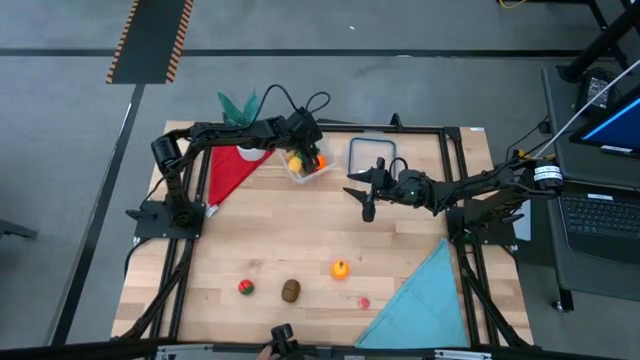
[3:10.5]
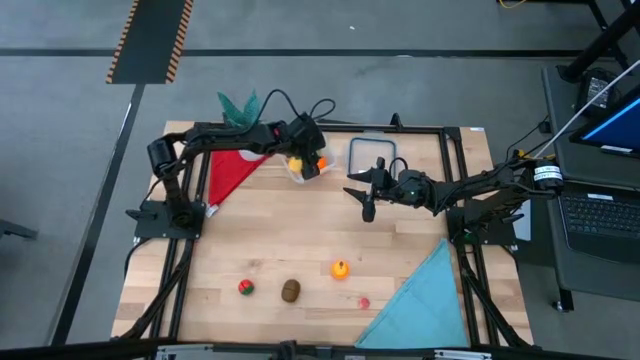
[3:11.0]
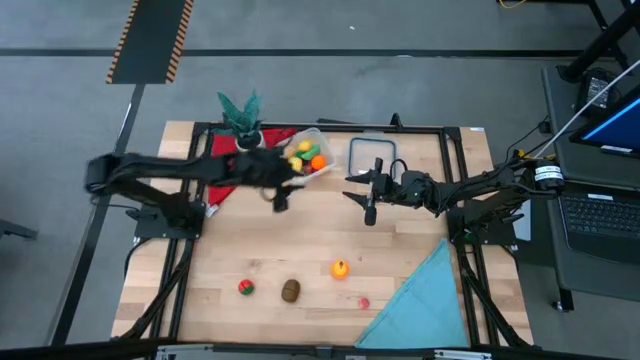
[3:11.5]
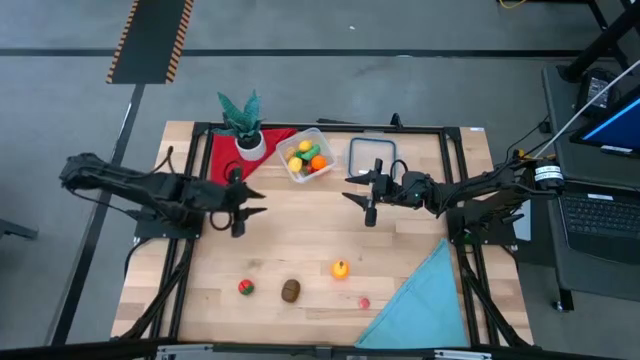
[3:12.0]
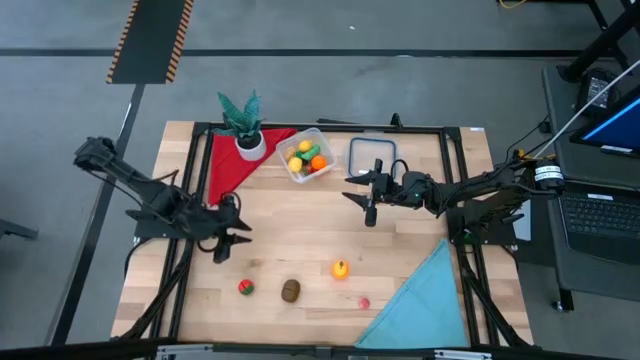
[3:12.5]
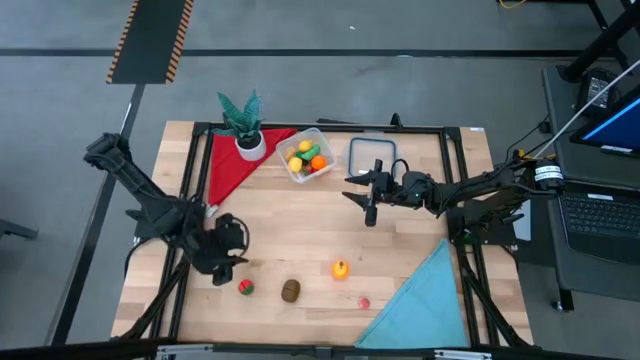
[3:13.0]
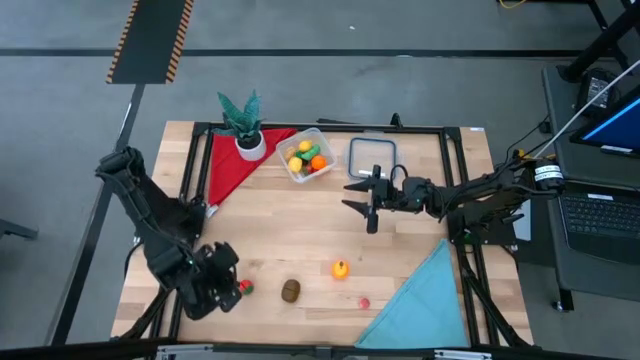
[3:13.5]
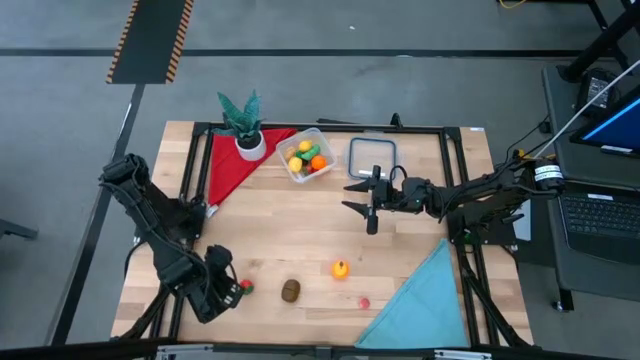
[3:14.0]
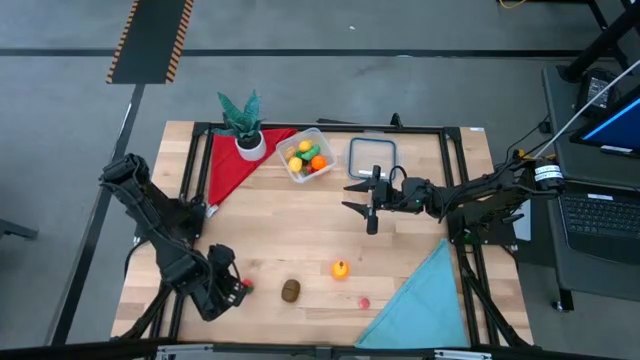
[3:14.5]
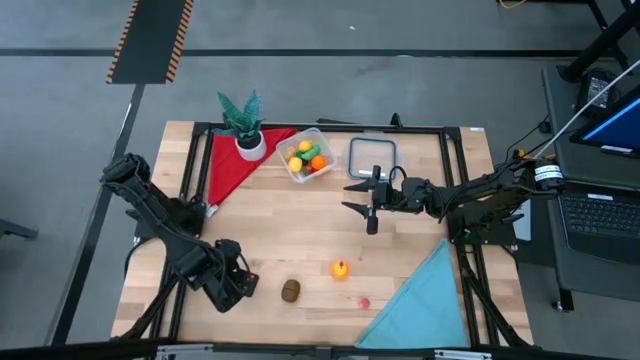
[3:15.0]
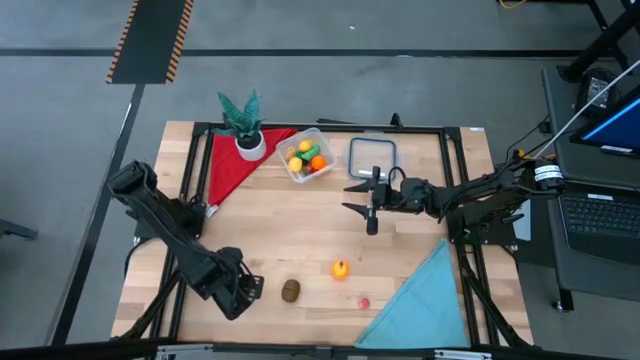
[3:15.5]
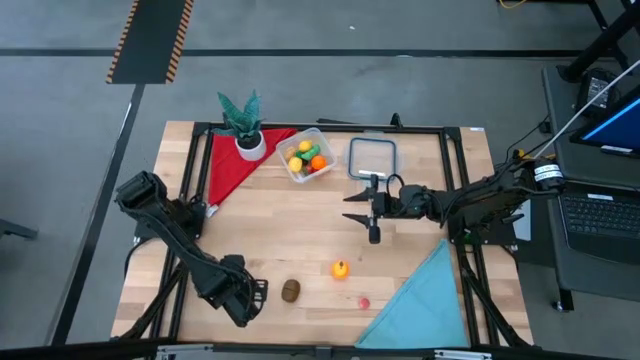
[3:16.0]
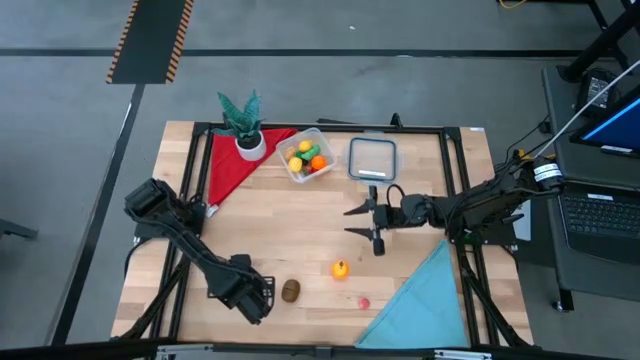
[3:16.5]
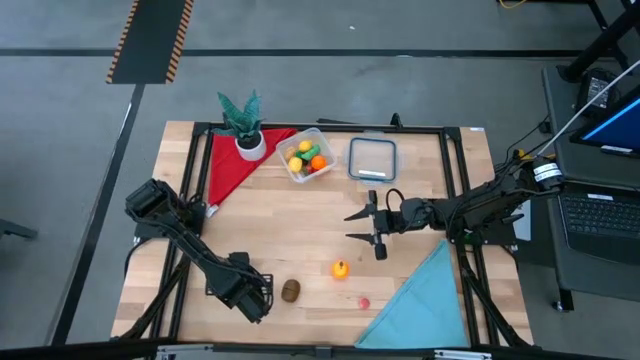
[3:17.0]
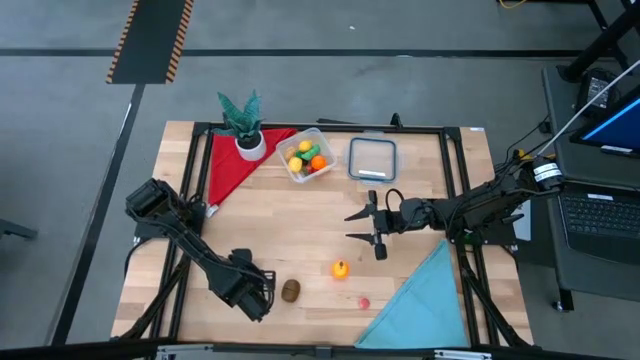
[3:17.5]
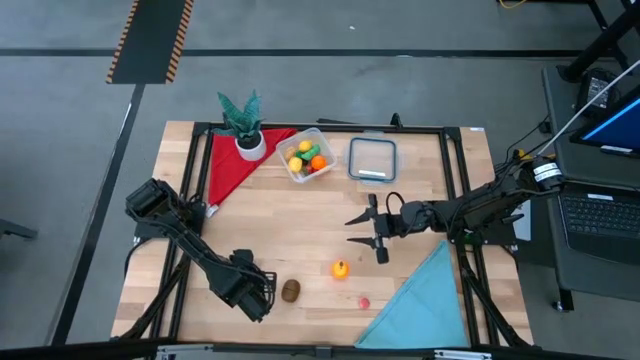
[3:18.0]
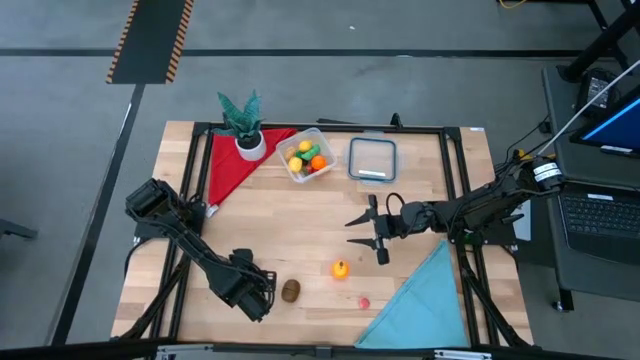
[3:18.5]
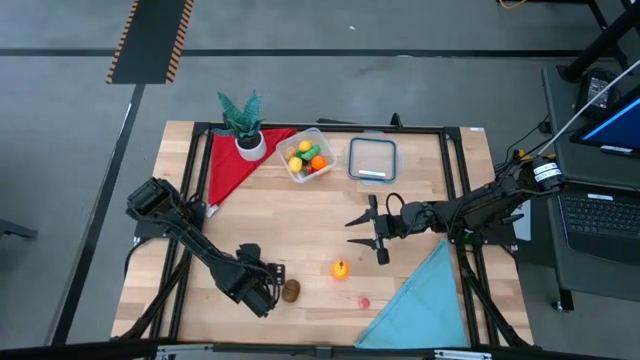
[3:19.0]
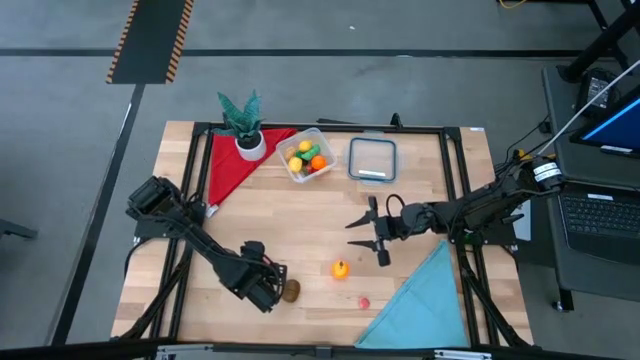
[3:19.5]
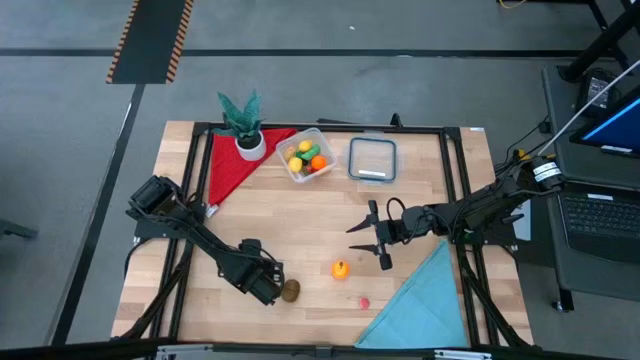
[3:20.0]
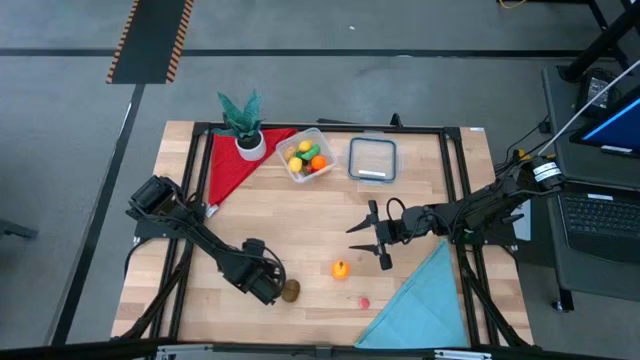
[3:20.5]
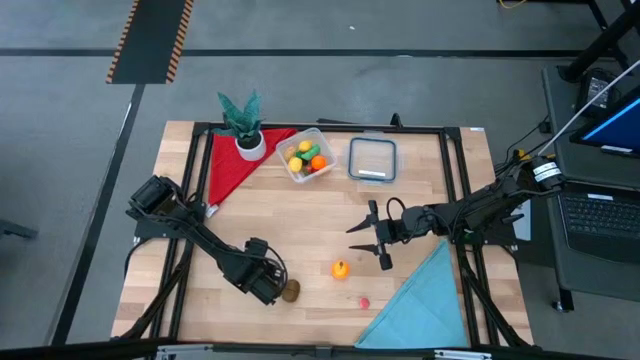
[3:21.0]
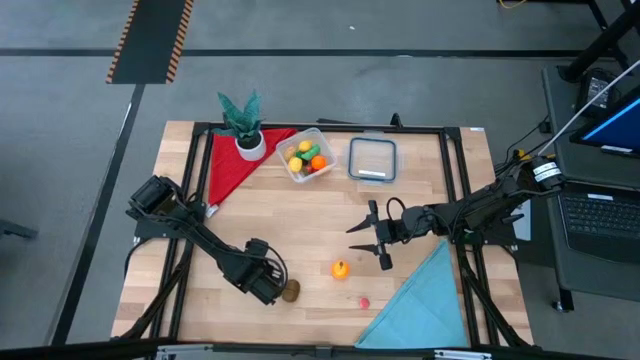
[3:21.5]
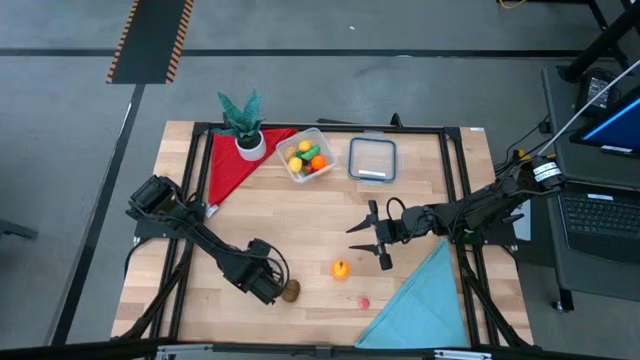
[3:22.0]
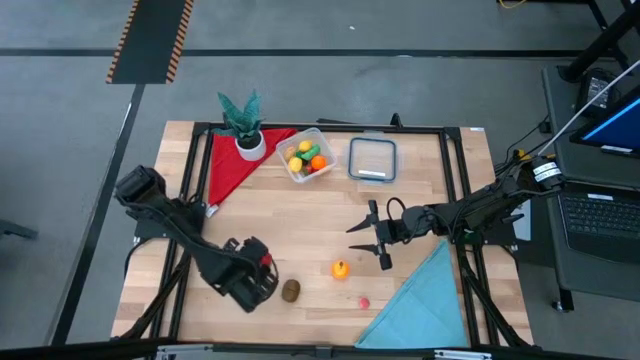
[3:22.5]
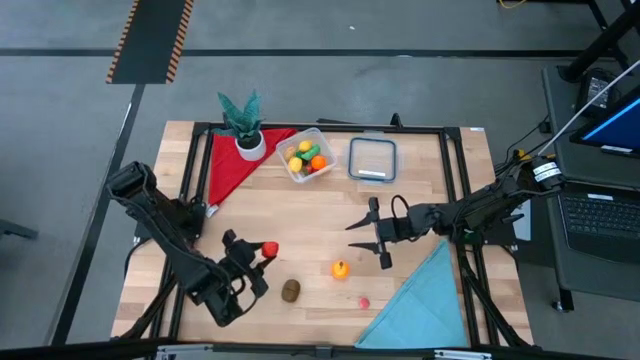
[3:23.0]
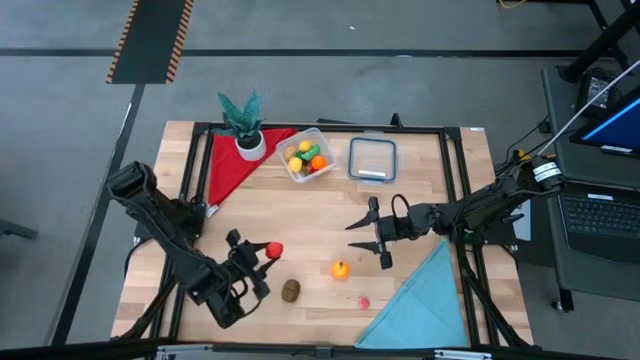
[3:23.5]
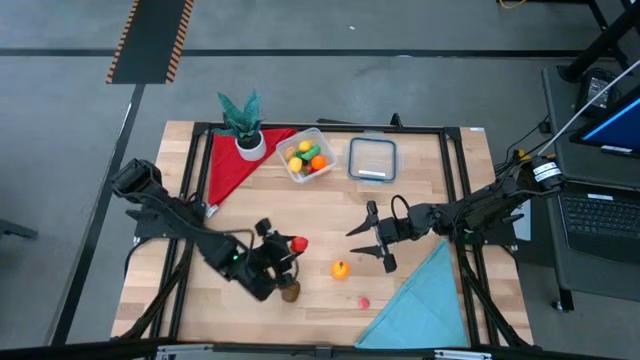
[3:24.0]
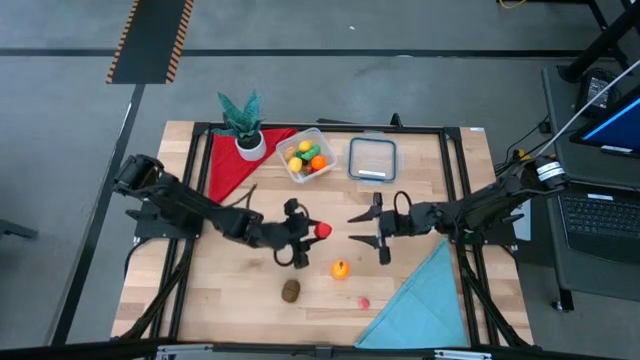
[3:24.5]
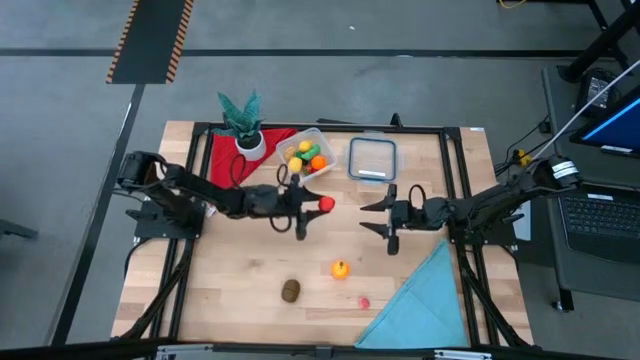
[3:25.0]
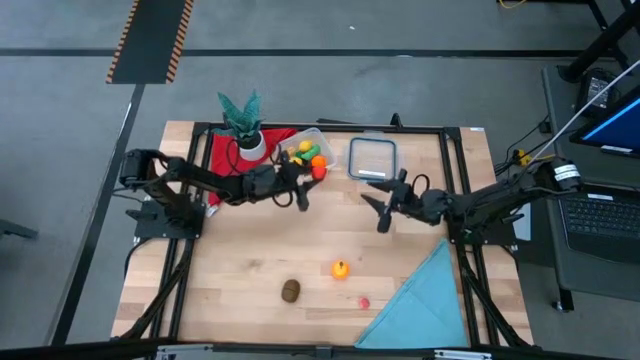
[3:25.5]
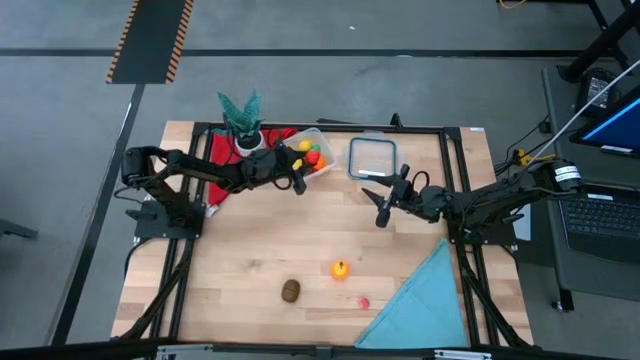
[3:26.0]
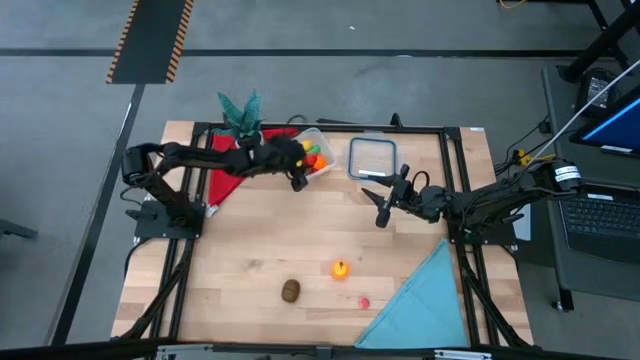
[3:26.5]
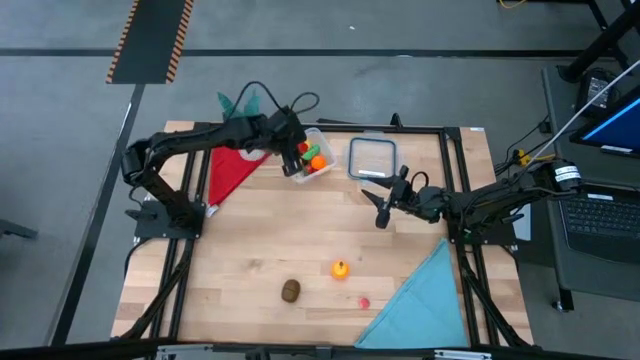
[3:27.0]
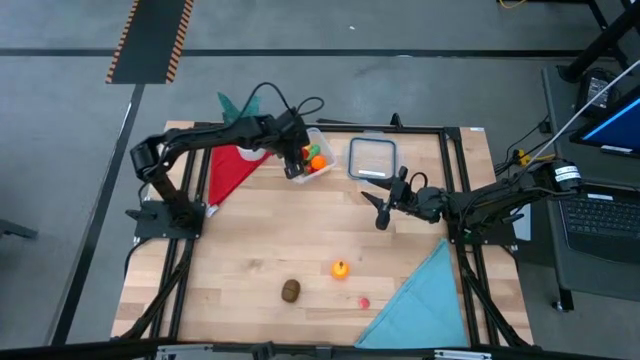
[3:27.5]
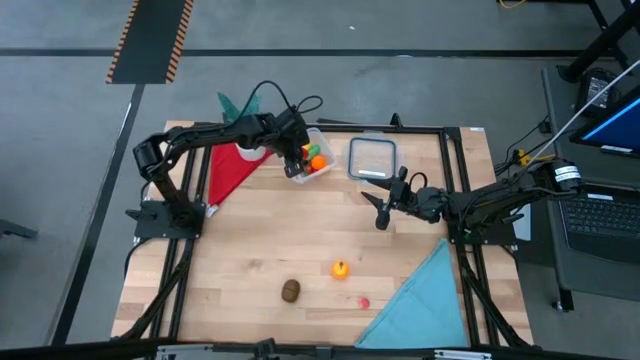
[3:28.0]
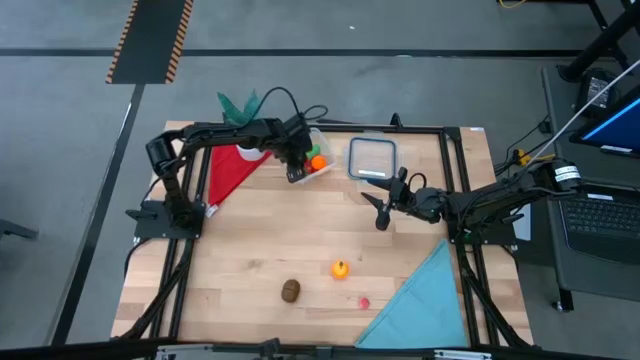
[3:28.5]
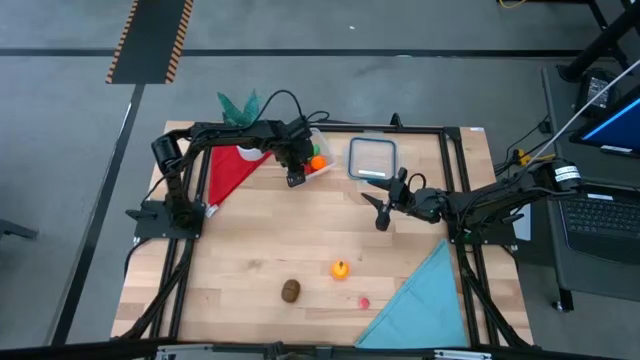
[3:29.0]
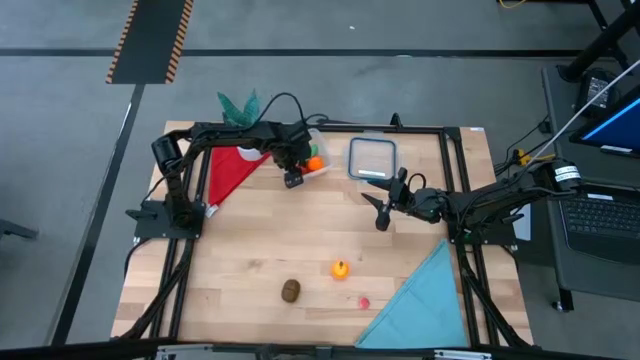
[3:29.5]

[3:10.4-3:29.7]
Task: Pick and placing Produce into tupperware
Put the strawberry into the transparent bin

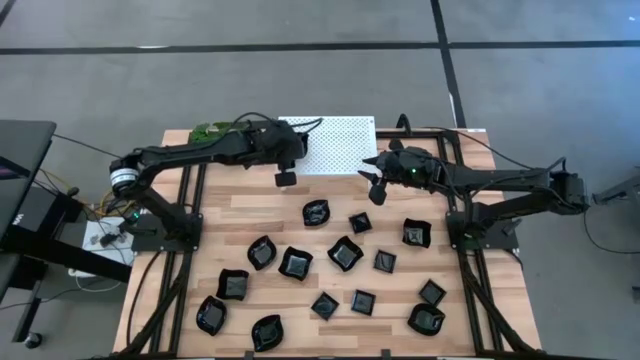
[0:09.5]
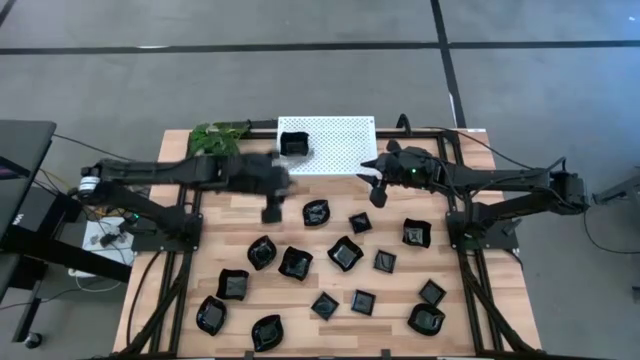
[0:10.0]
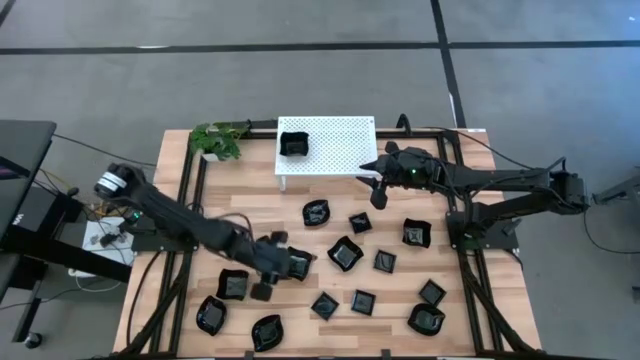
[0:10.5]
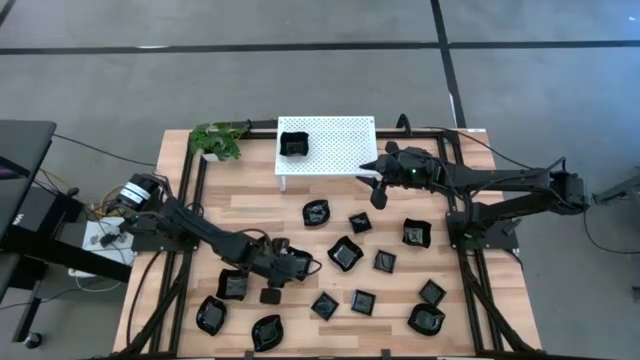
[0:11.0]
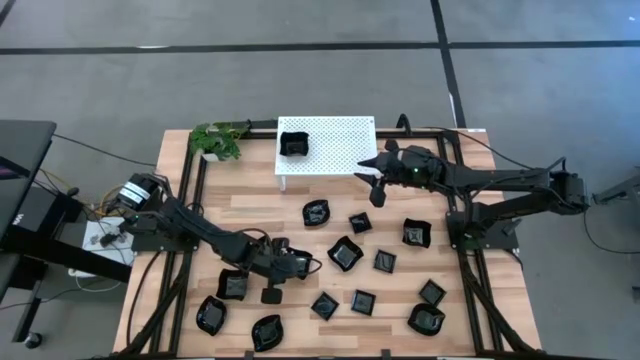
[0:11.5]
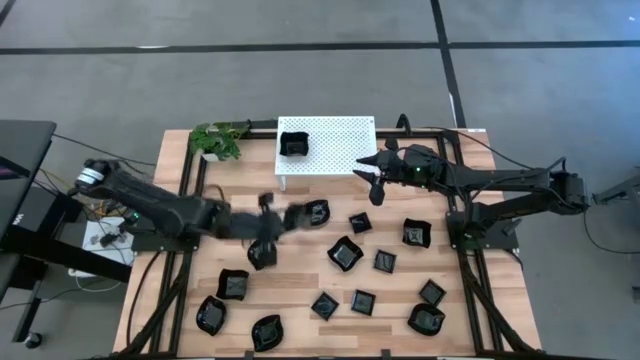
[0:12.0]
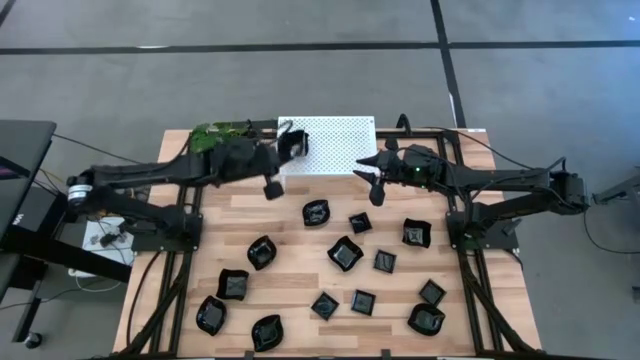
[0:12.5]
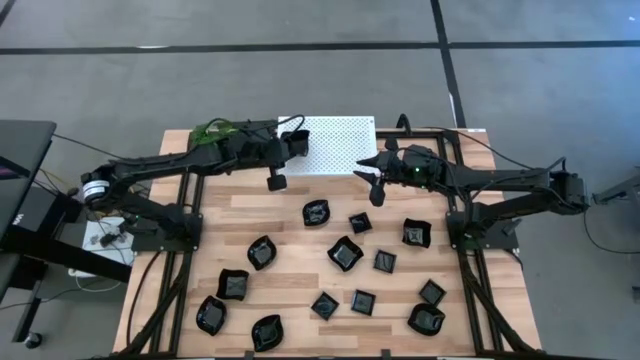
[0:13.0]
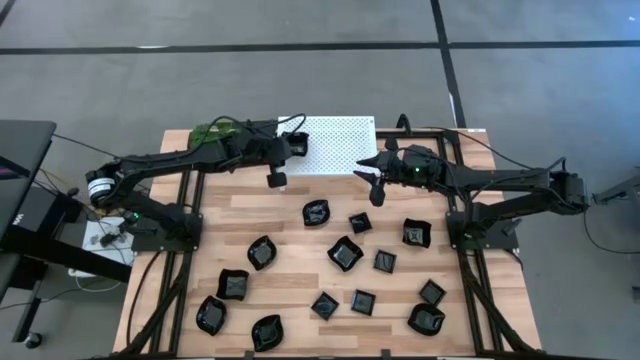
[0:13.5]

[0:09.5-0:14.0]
Task: Pick & Place Mini shaped plates
Stack the black distorted square plate on top of the black distorted square plate on the shelf
